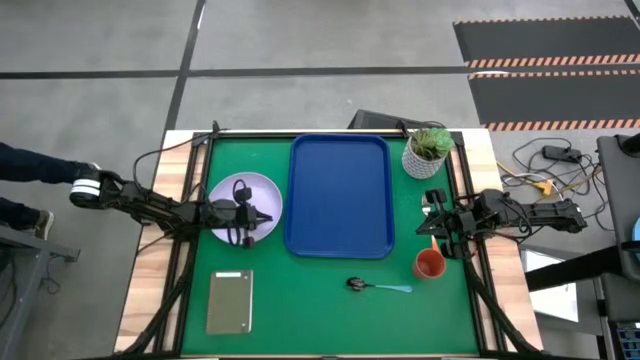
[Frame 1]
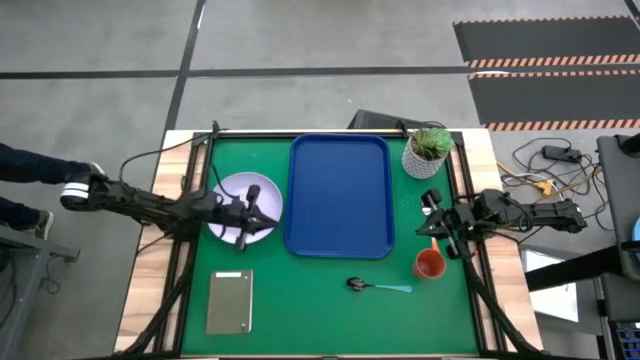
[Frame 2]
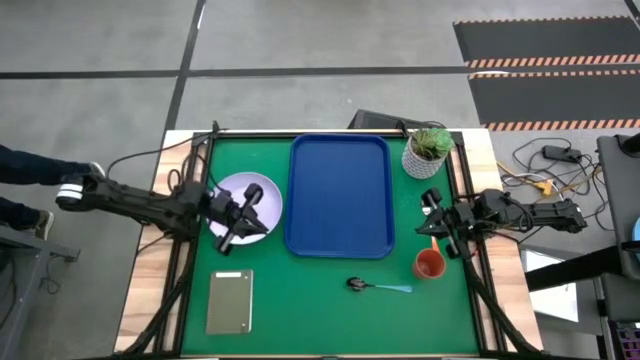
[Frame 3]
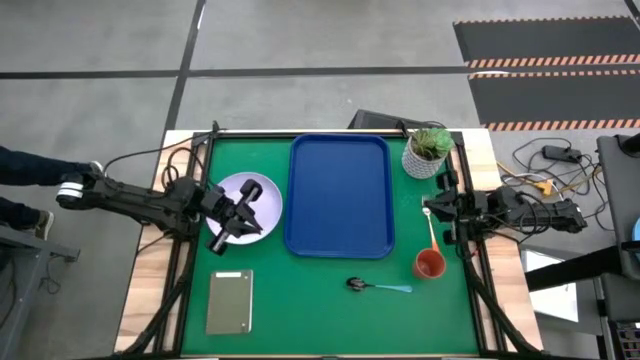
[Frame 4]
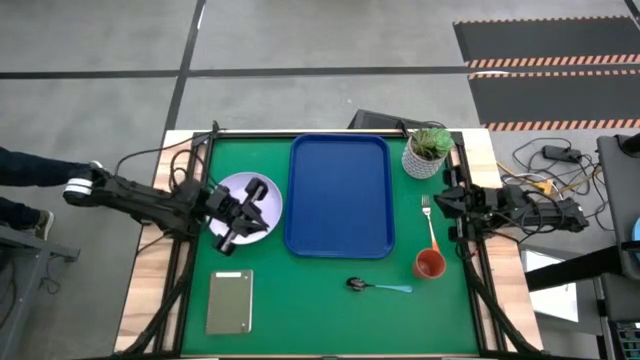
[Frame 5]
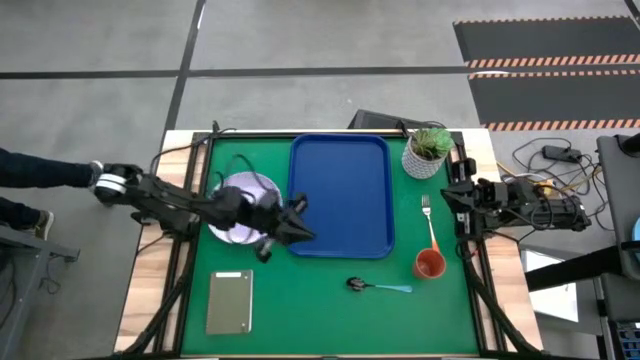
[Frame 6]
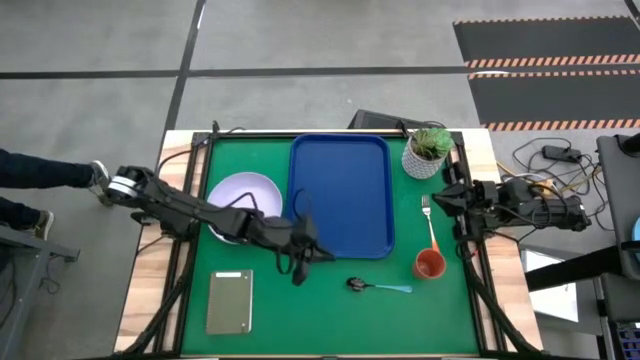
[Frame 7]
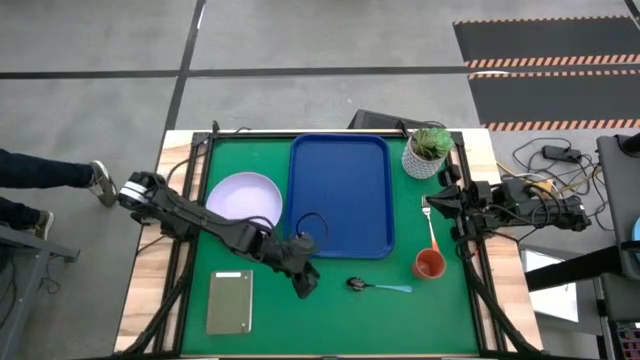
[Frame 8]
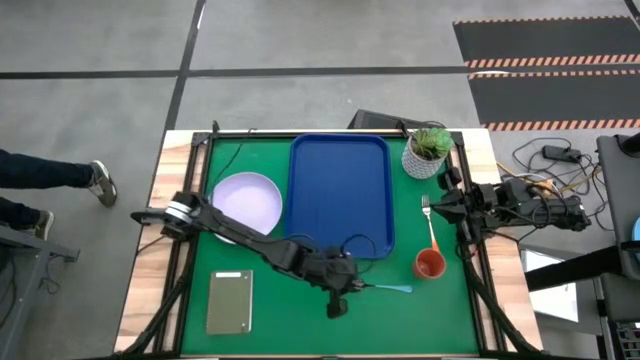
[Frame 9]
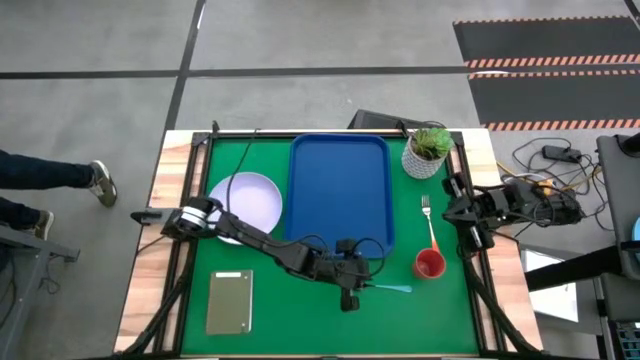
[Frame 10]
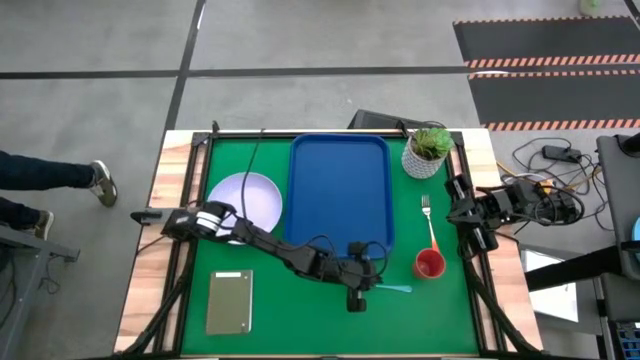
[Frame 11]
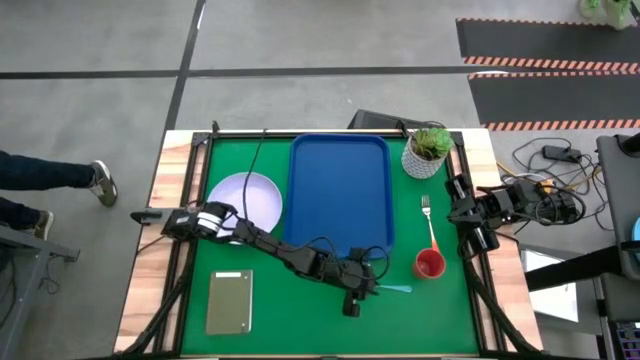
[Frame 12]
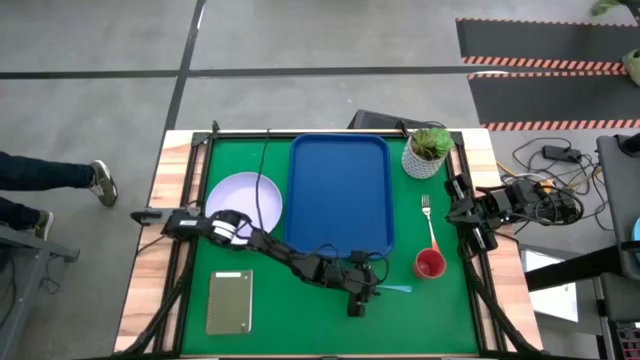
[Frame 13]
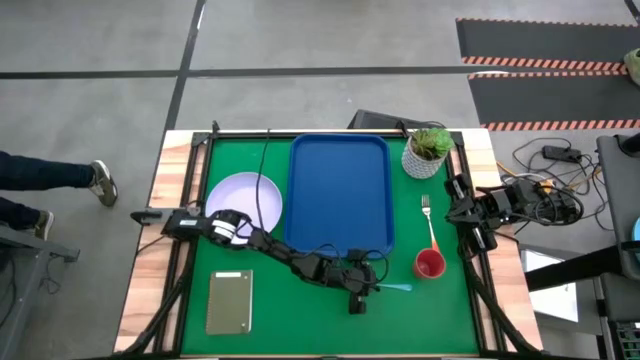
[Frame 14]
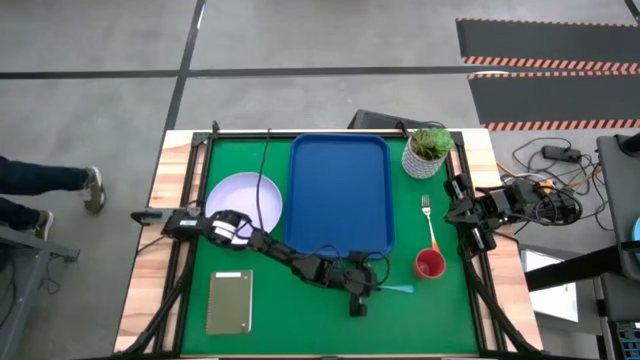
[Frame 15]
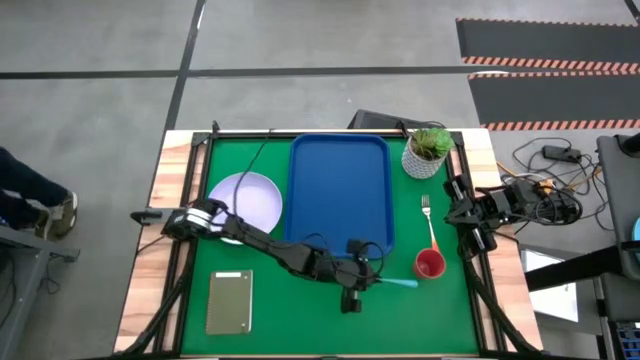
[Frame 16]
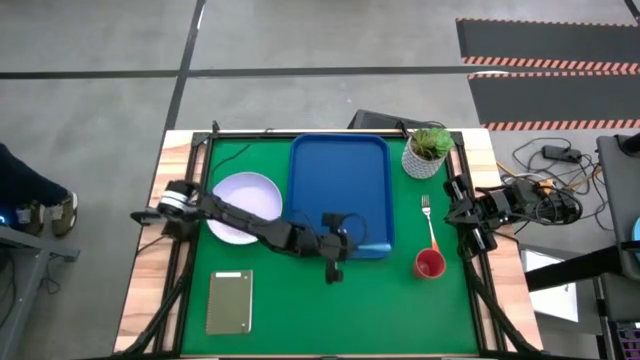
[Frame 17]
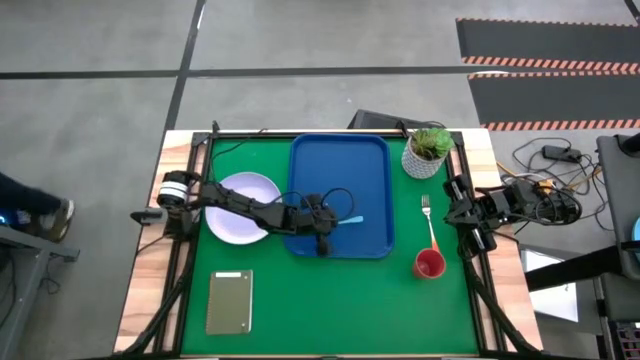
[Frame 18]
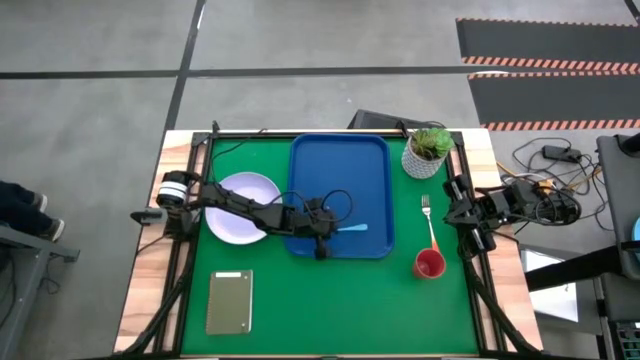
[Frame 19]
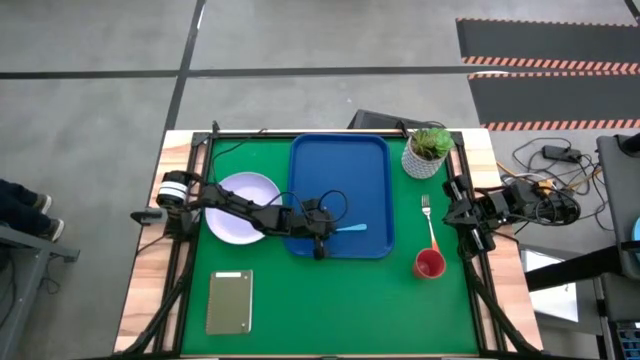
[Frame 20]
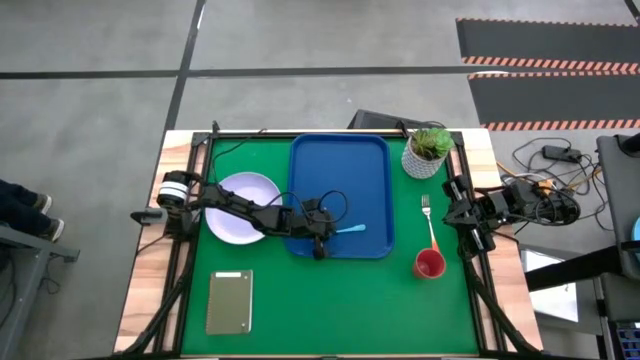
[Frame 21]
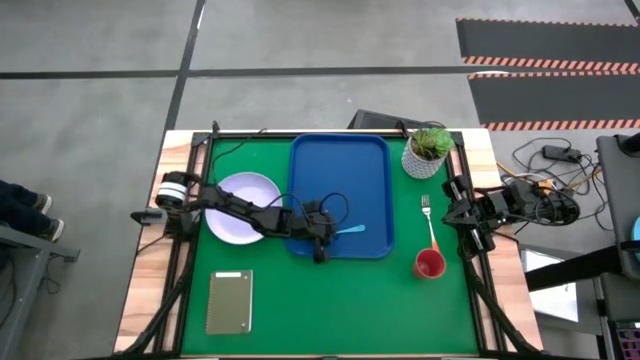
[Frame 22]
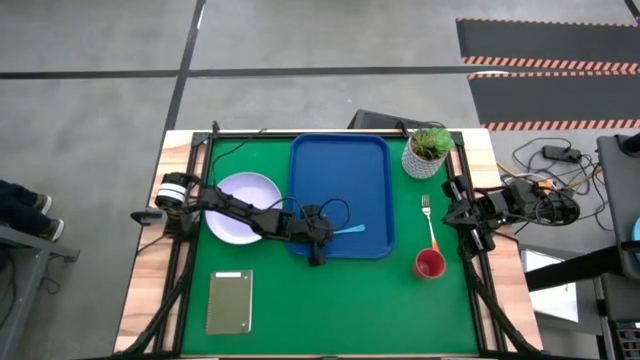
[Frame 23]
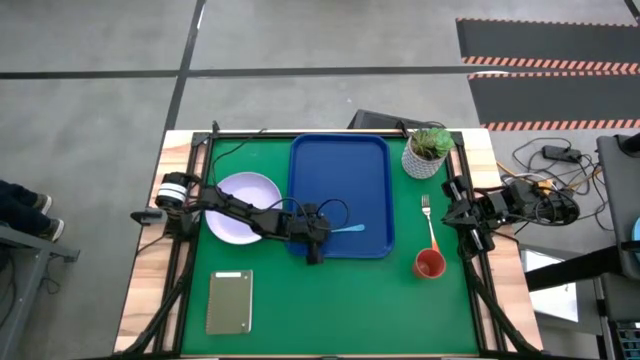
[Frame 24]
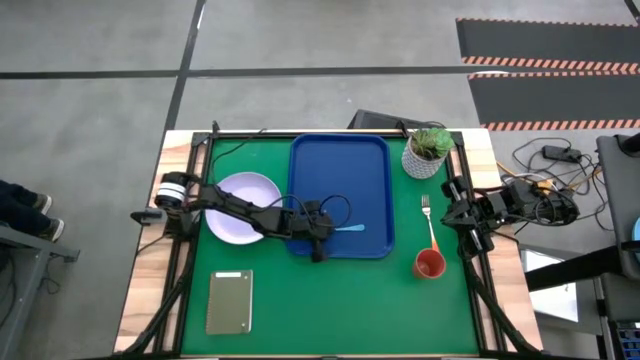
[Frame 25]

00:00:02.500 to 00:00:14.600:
Task: Pick and place plate/cup/fork/spoon on tray
Put the green spoon on the blue serving tray

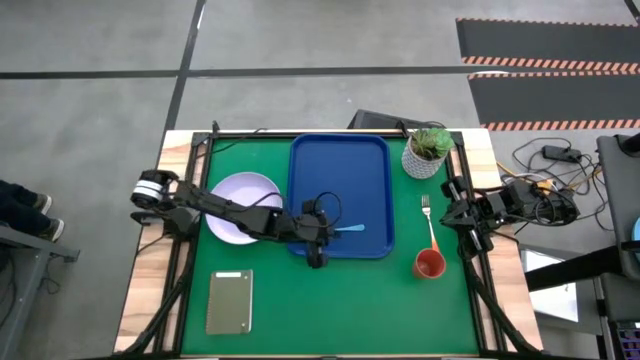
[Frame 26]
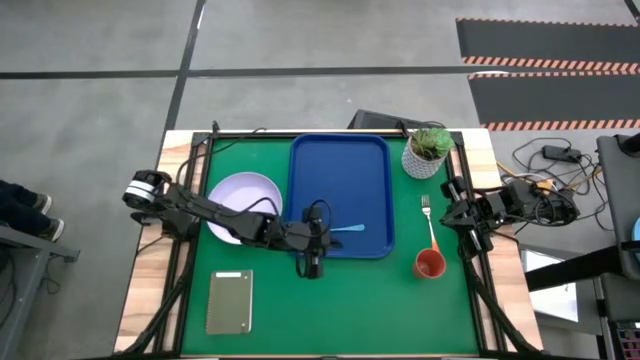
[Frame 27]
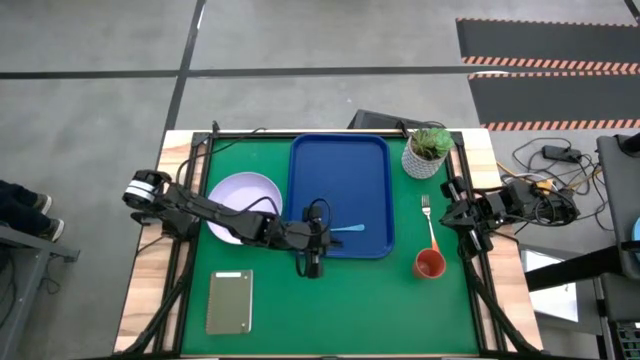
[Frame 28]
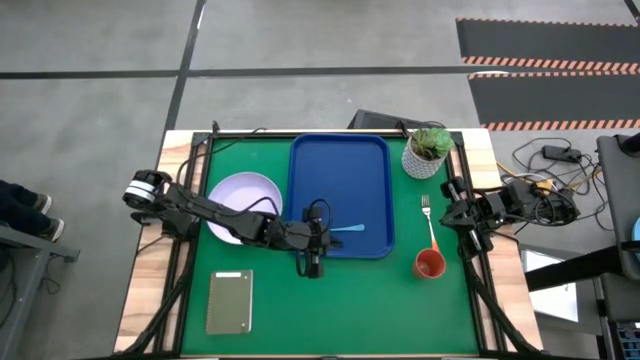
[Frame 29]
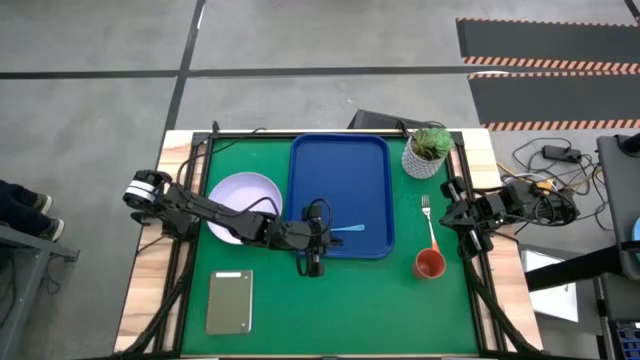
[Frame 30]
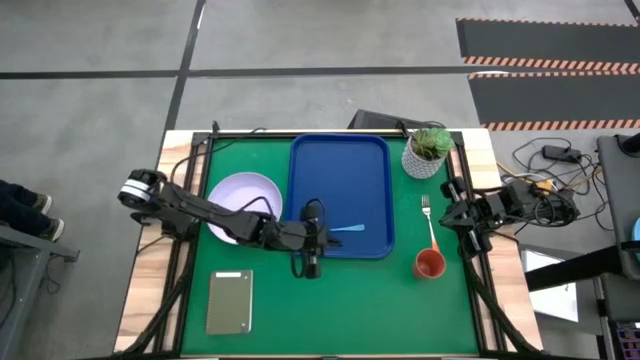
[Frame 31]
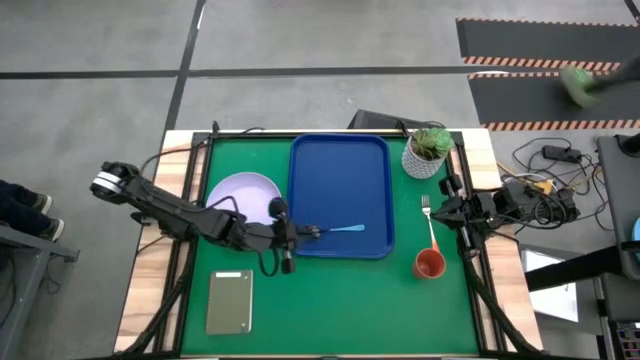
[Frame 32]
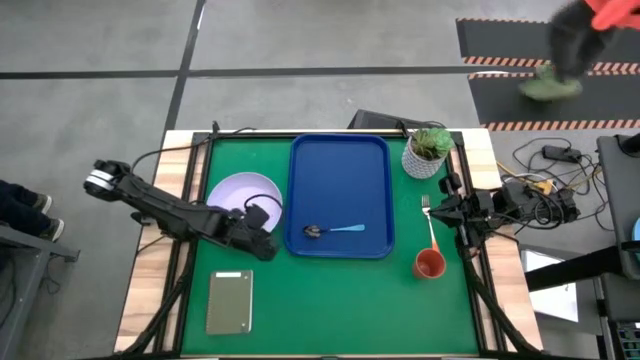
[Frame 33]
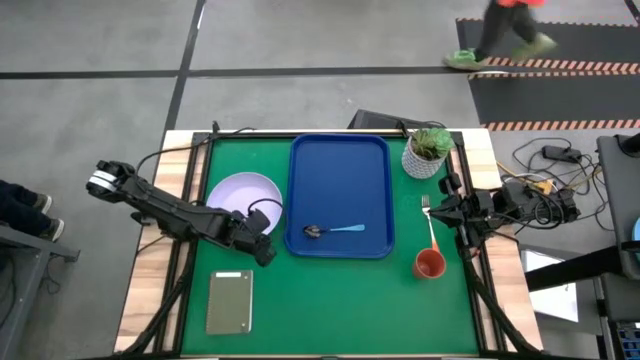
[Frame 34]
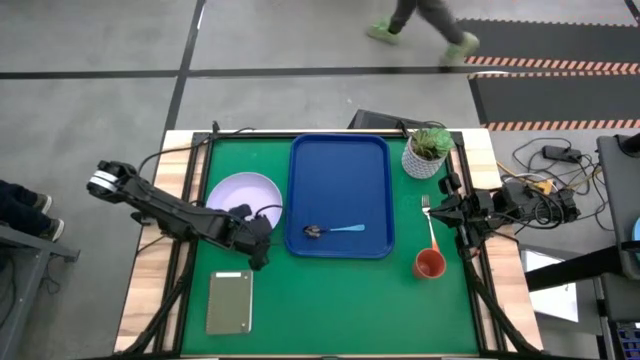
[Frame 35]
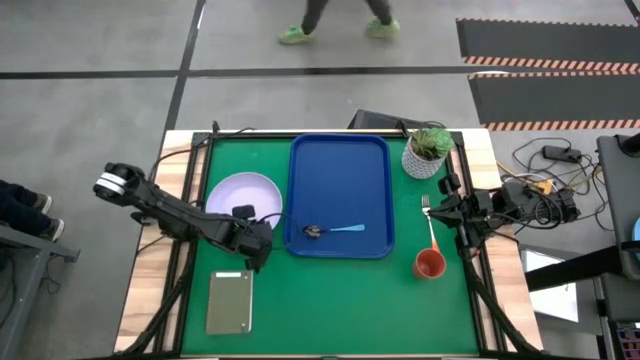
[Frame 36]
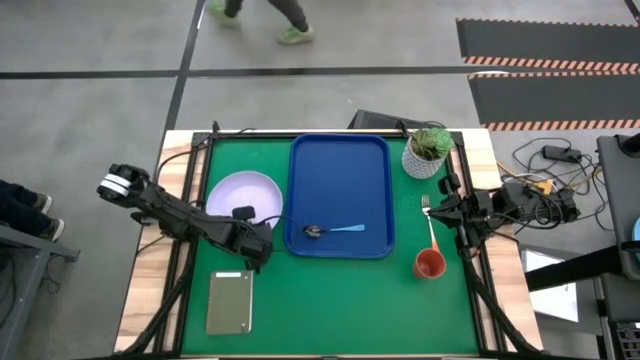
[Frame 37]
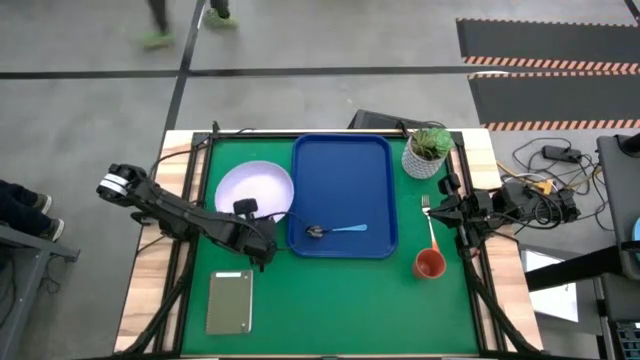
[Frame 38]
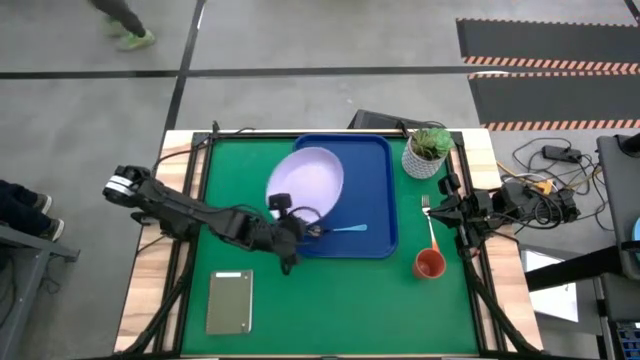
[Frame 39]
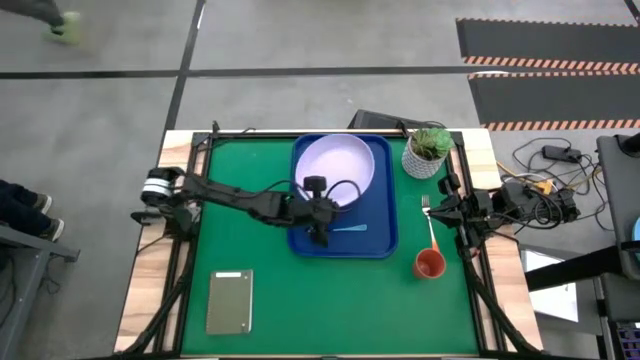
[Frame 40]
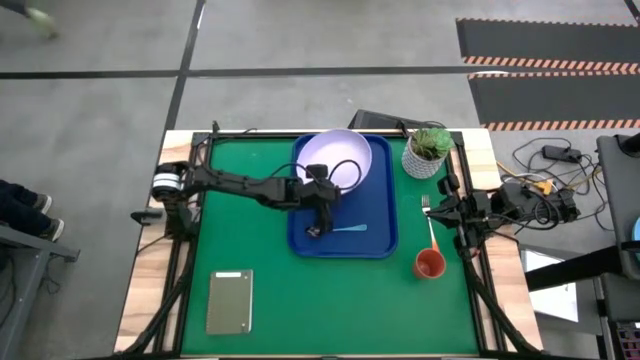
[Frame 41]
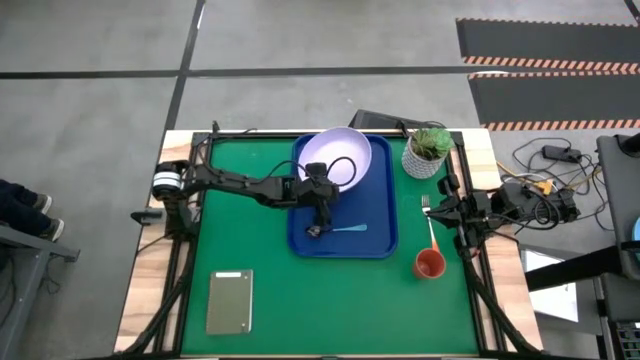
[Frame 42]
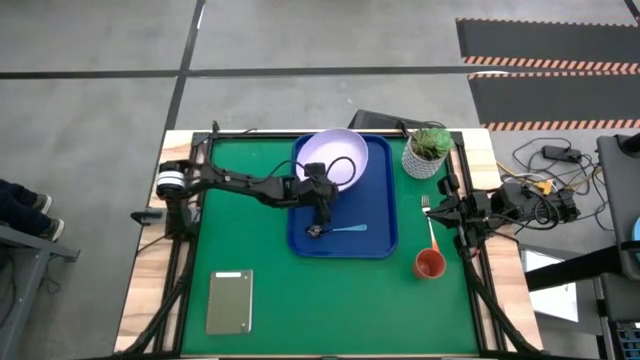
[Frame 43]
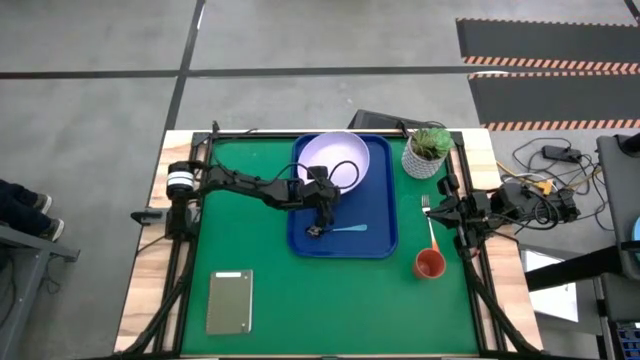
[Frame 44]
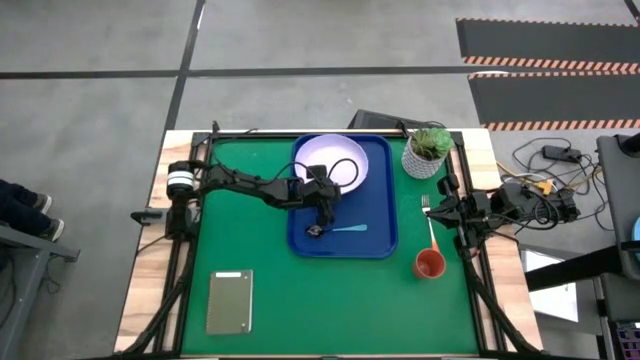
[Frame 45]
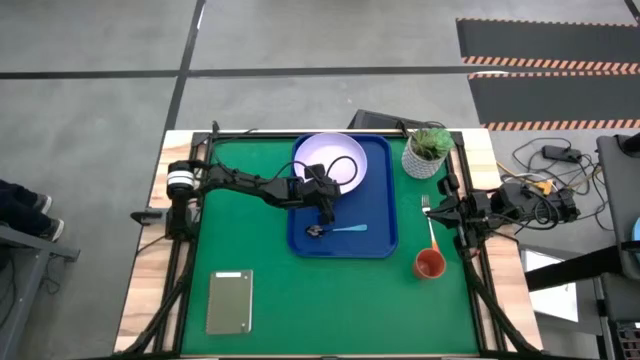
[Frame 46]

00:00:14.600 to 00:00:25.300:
Put the white plate on the blue serving tray to the top of the green spoon
